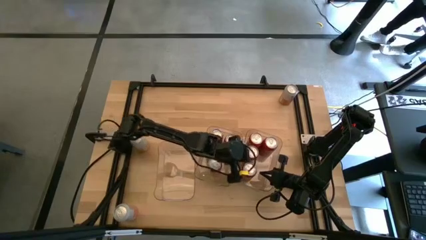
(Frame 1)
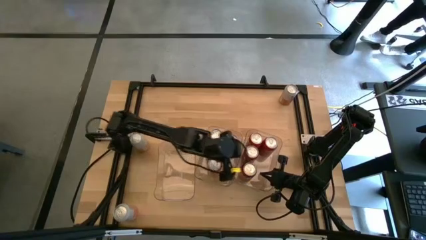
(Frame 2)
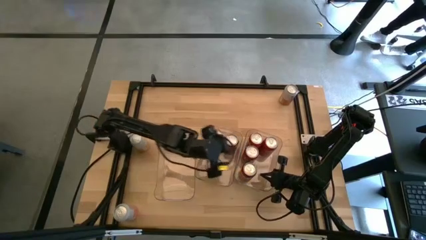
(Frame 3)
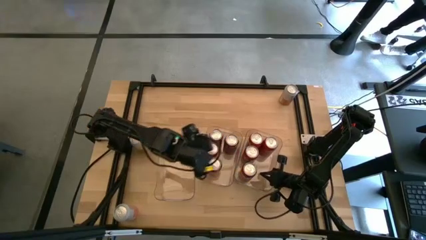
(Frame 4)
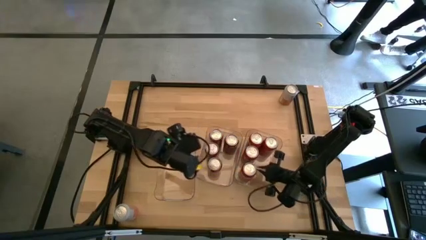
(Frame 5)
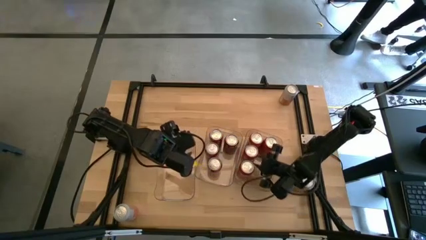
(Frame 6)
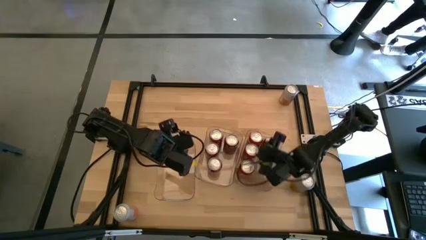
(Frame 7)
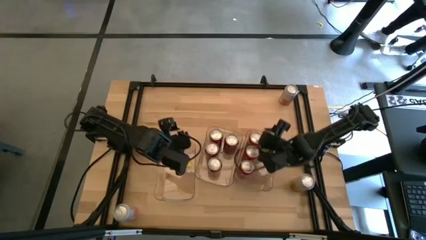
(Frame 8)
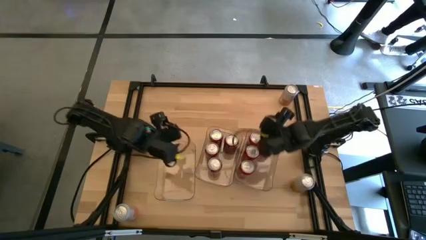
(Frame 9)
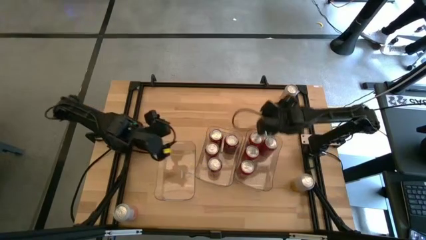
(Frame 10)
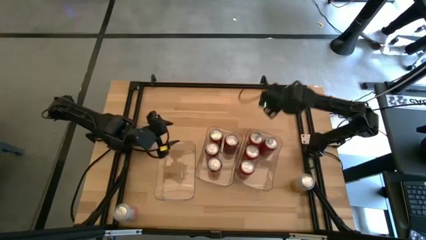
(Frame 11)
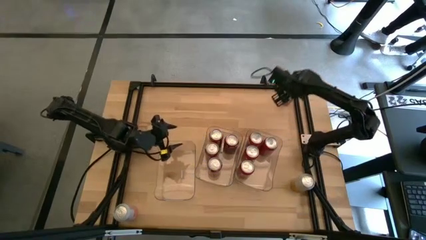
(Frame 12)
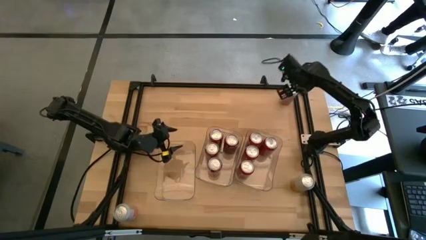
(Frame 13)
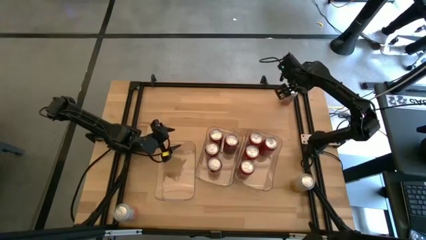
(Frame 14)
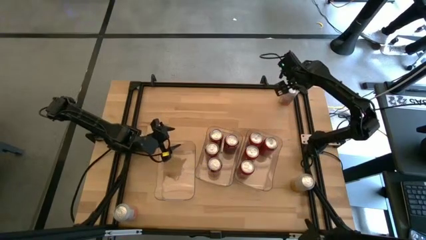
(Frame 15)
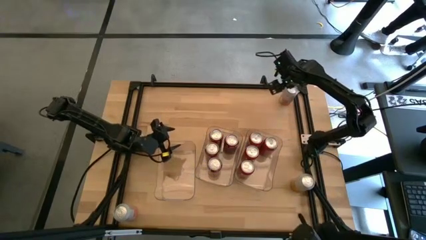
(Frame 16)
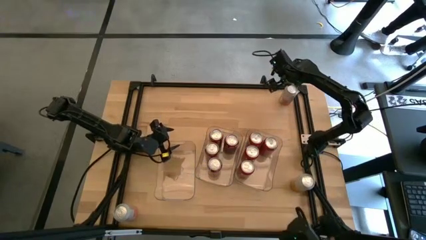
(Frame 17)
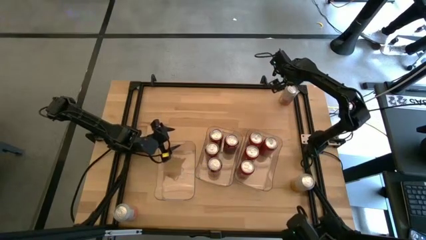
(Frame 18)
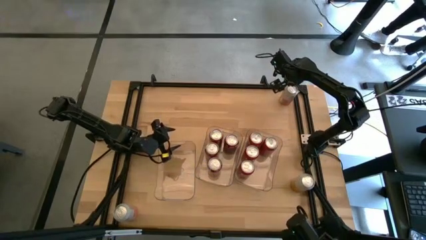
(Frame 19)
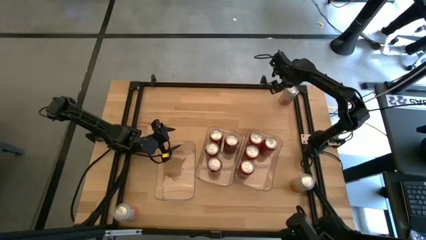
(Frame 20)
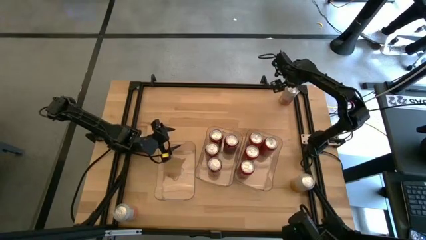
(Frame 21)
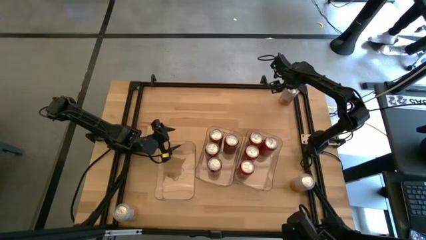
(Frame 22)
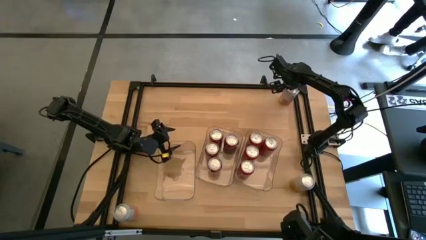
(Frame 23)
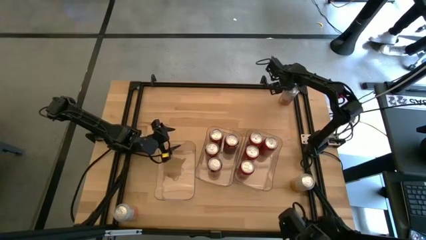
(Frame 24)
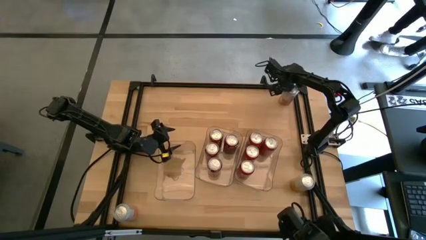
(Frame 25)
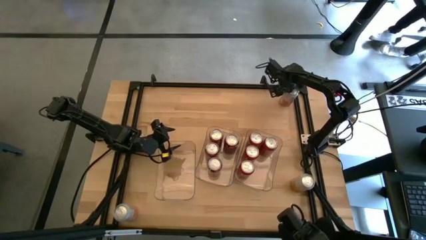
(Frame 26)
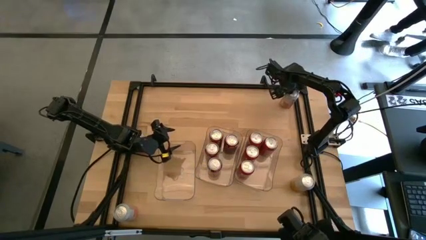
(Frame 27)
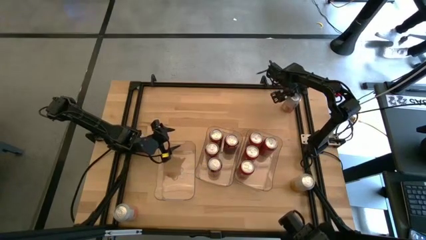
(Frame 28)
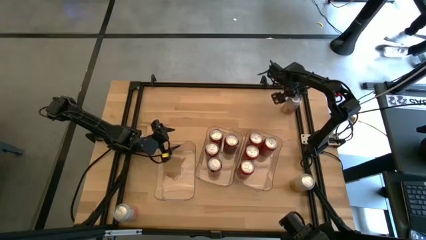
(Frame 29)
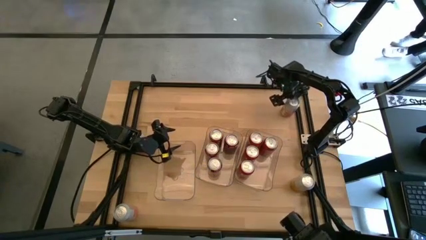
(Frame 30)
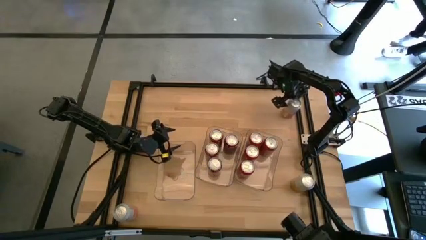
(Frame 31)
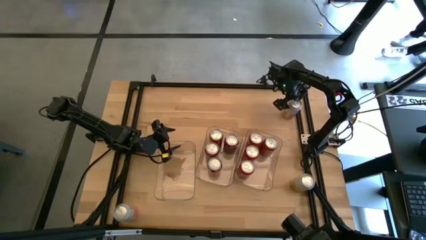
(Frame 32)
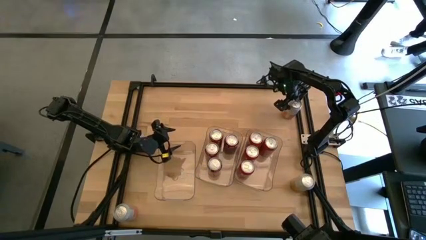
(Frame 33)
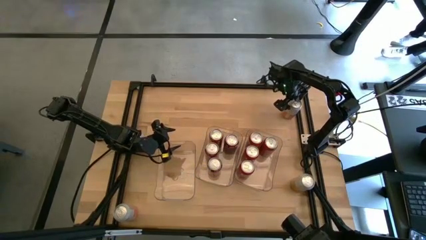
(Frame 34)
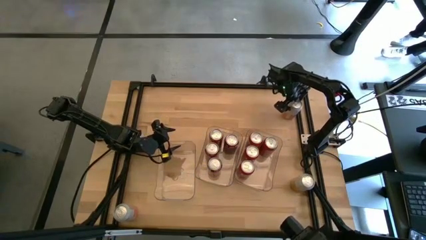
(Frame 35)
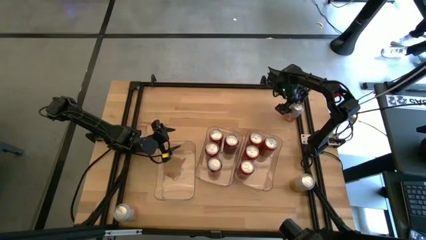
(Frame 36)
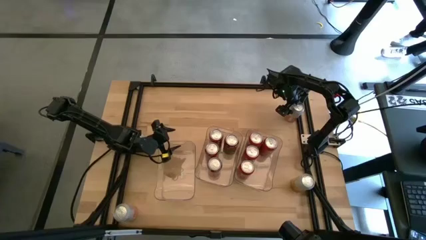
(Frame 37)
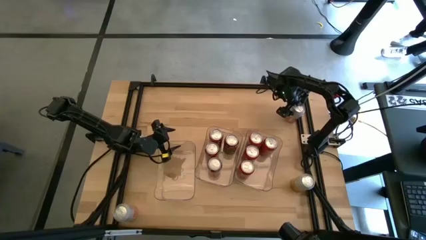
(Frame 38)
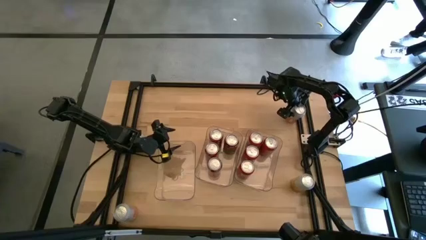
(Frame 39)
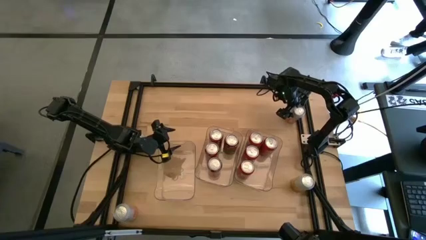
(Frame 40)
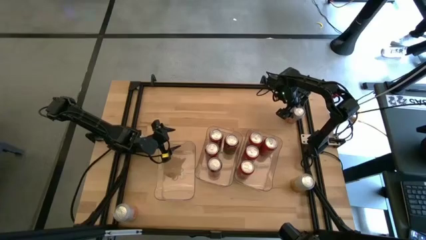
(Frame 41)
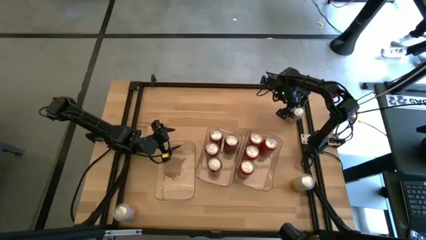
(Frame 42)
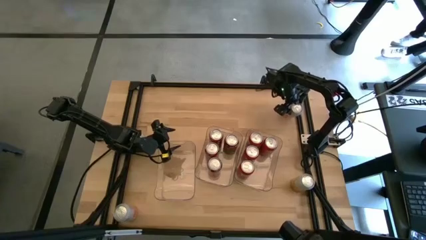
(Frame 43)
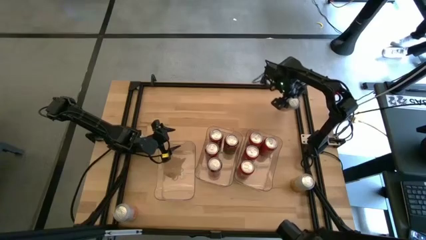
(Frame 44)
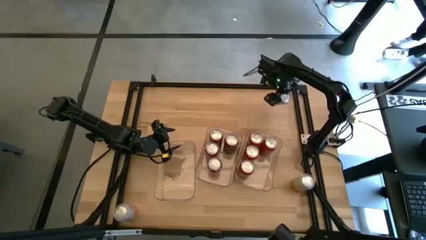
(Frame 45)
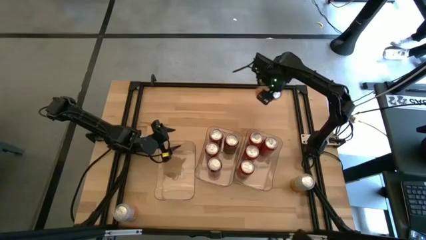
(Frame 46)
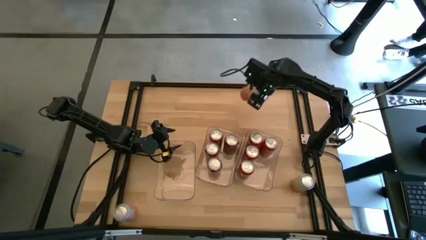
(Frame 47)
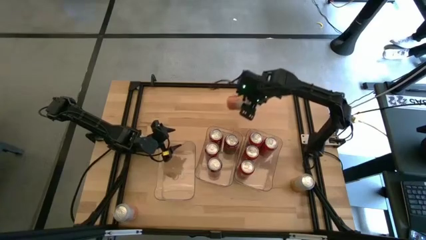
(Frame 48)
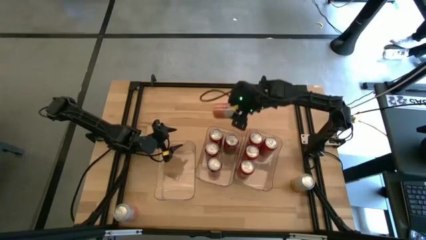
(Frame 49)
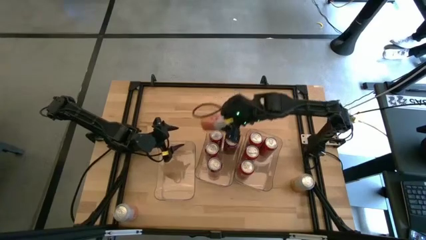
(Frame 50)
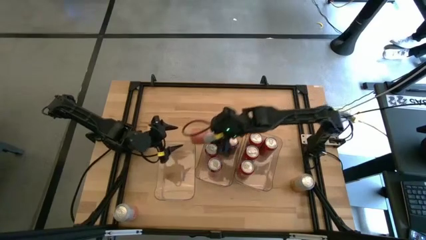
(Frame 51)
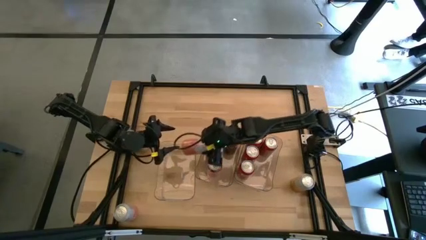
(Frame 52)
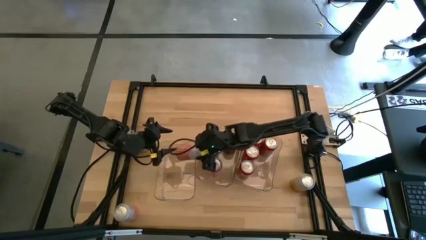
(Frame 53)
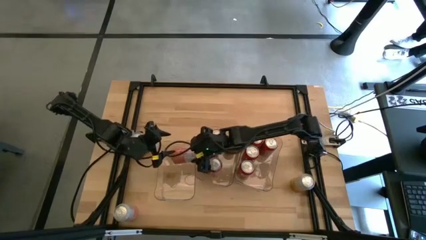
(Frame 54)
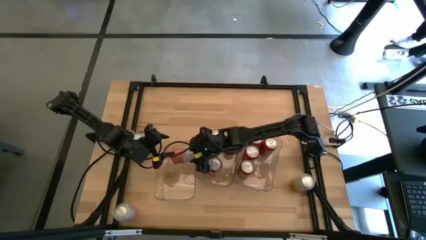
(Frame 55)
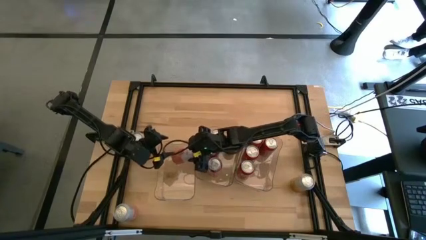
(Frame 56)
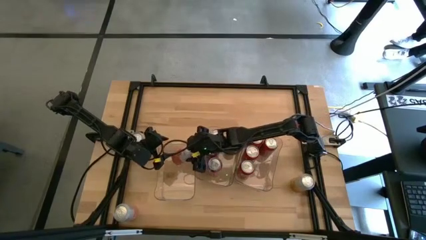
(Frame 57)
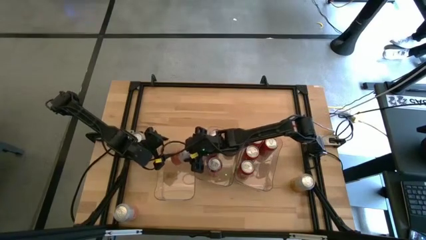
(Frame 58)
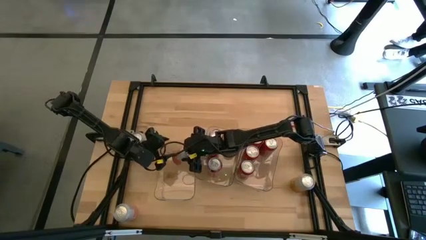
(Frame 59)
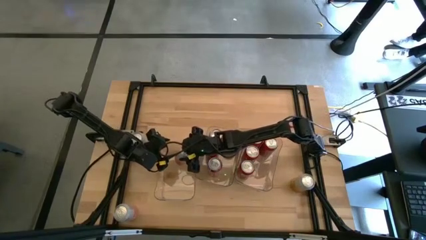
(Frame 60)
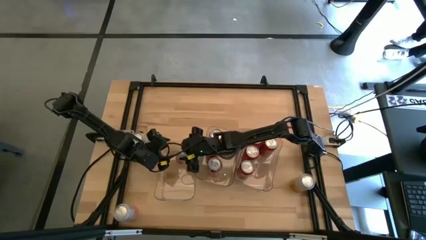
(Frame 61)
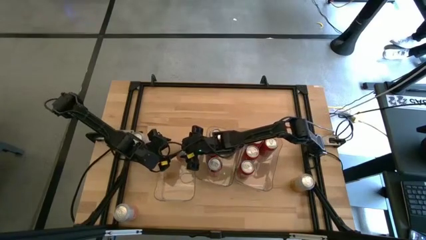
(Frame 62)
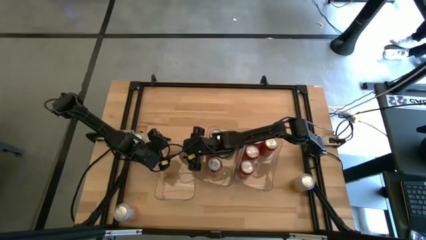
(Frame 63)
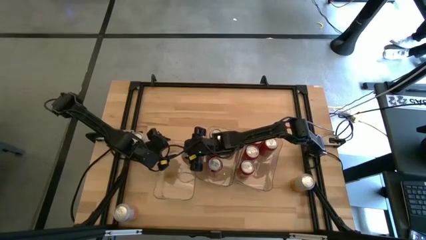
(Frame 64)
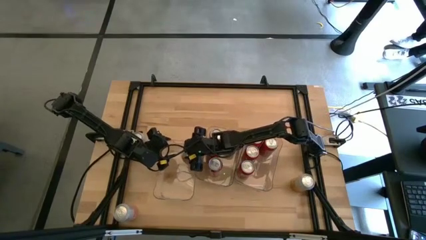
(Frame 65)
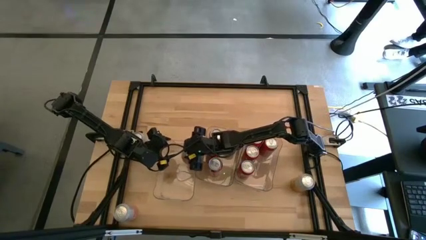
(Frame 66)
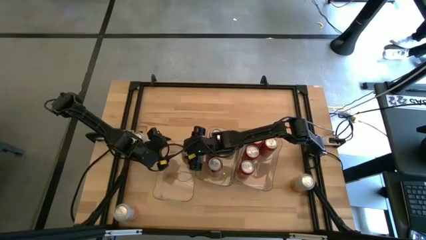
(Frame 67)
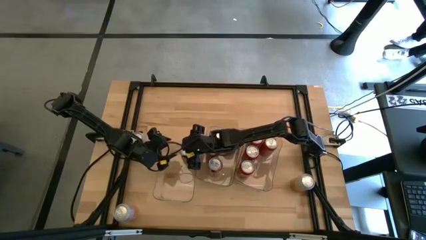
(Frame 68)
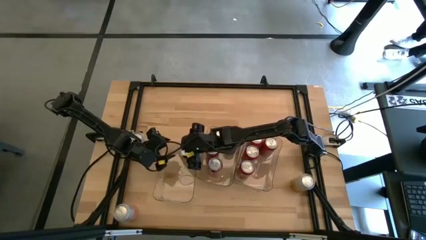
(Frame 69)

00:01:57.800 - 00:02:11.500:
Task: Sort soda cans
Put the top right orange white soda can into the left transparent bin

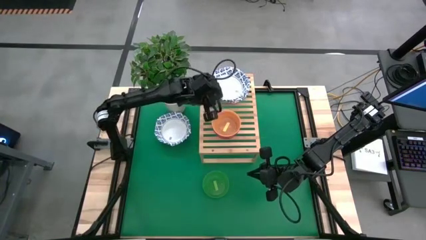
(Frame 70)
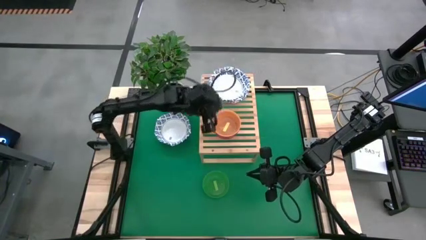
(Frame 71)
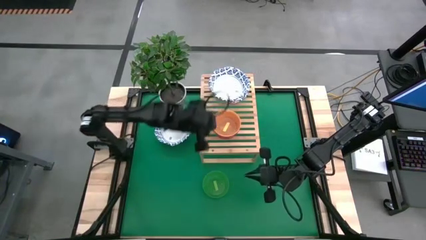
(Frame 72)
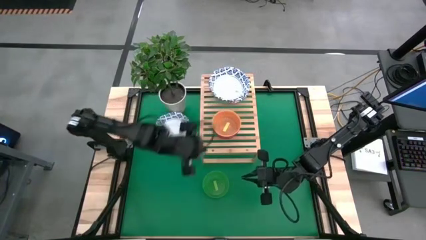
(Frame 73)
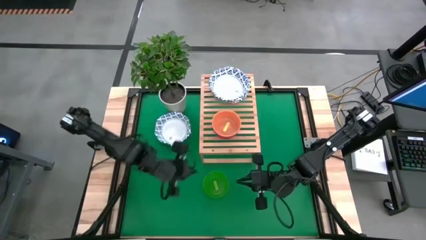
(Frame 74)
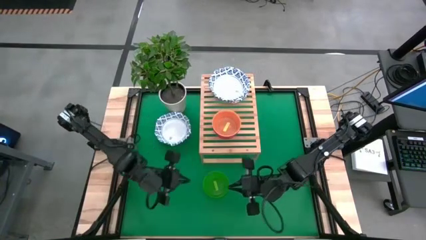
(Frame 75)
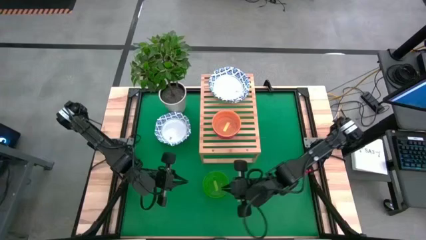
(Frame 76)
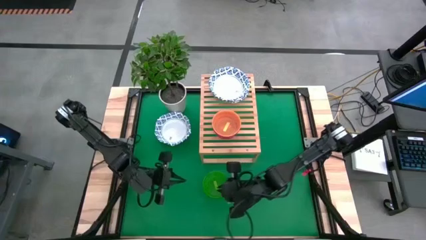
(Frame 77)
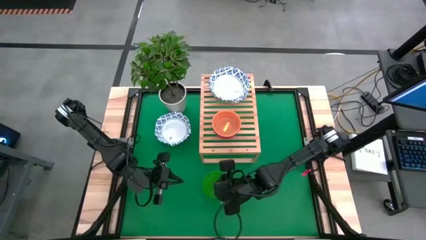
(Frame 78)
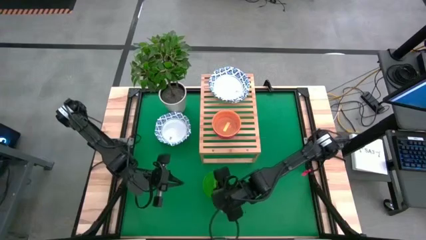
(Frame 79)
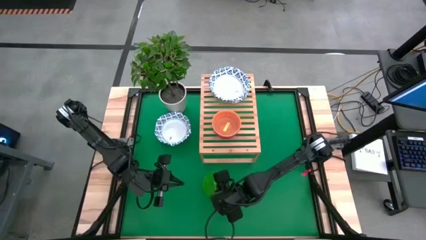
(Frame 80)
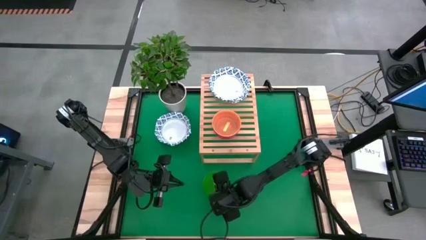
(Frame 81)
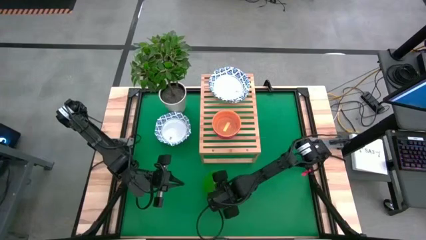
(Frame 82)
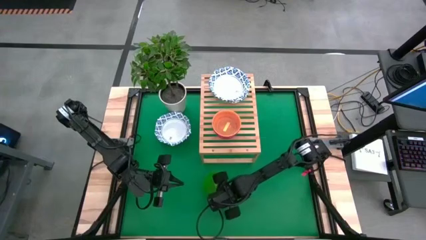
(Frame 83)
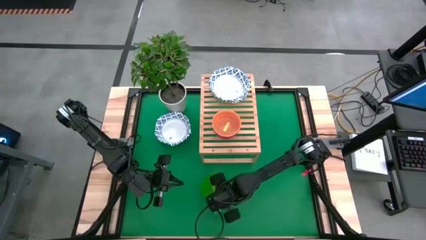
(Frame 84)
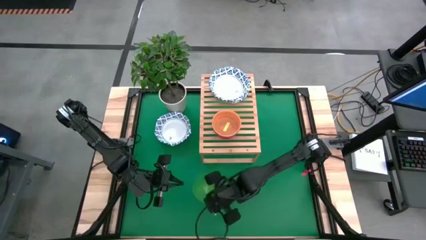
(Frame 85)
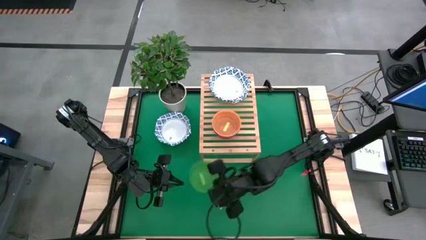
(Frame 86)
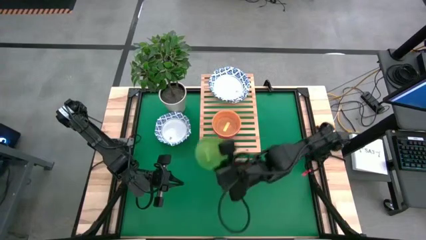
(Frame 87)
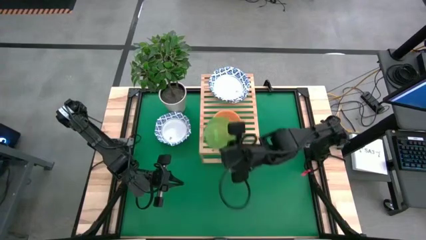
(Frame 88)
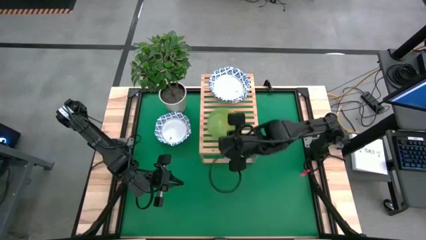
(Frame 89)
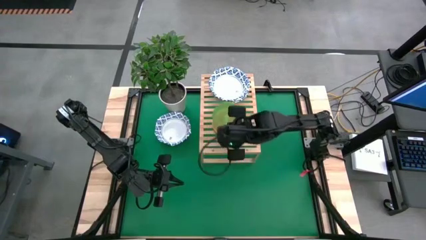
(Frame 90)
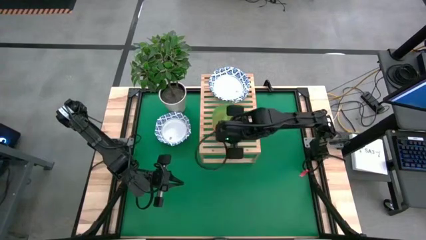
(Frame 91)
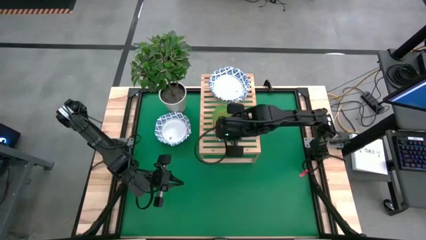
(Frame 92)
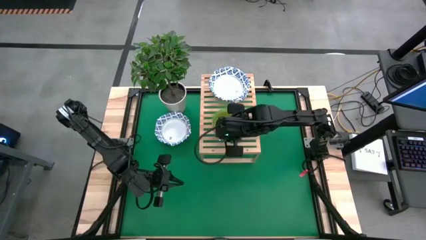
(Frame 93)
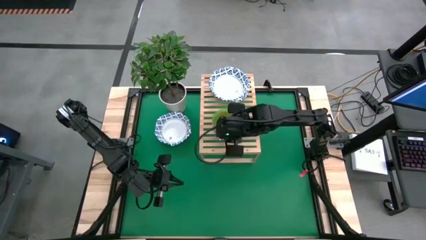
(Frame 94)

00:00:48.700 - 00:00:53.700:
Task: Place and stack bowls onto a shelf
Stack the green bowl on top of the yellow bowl on the shelf
